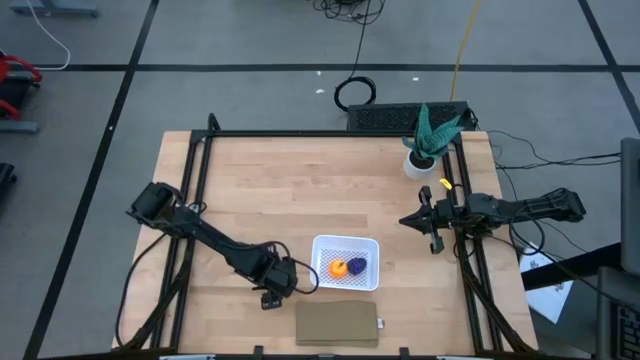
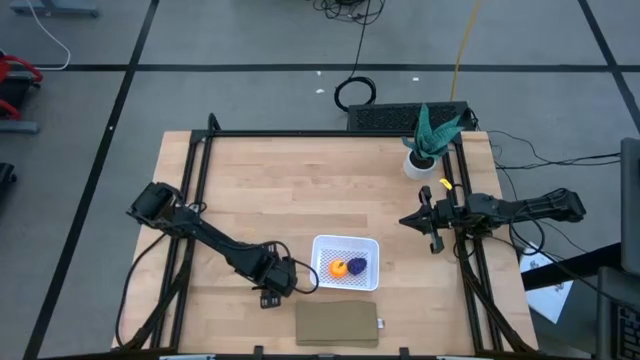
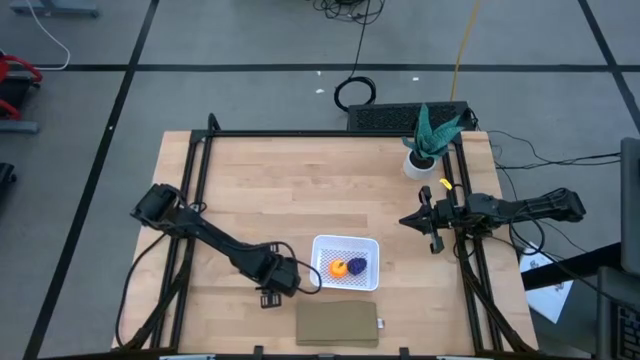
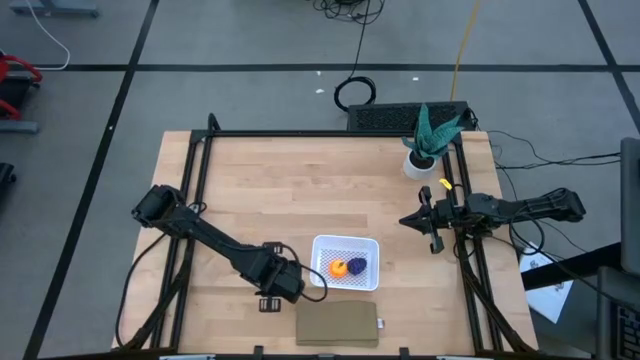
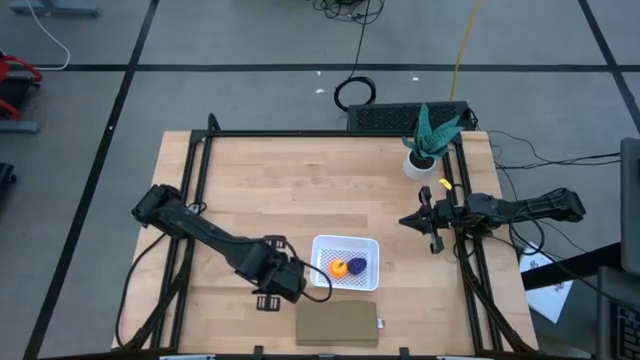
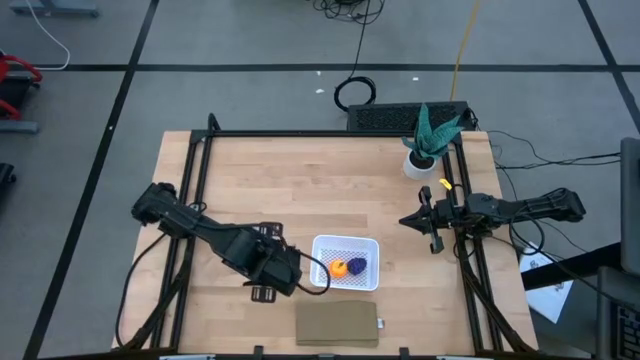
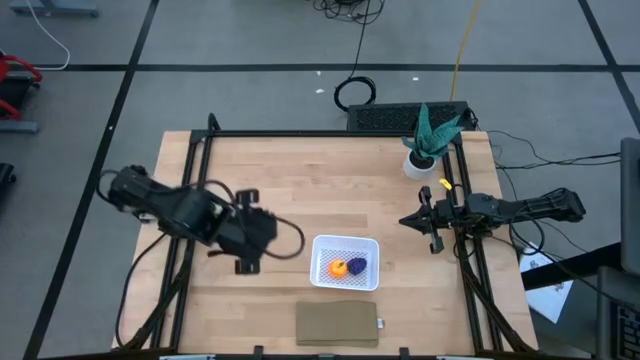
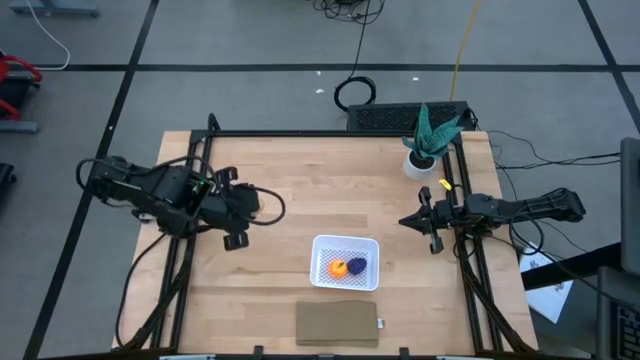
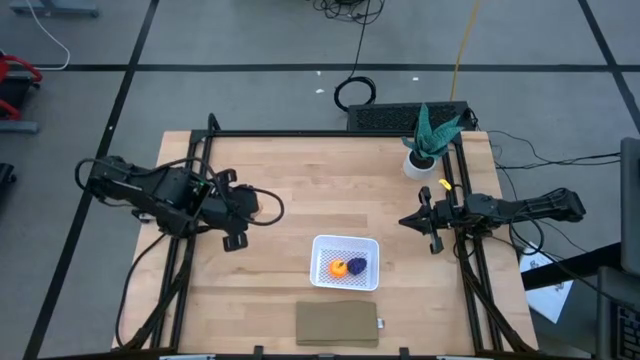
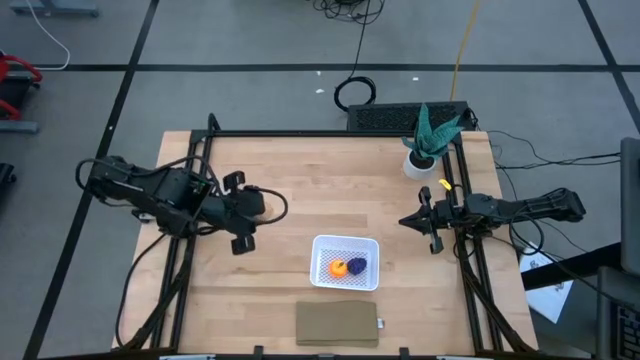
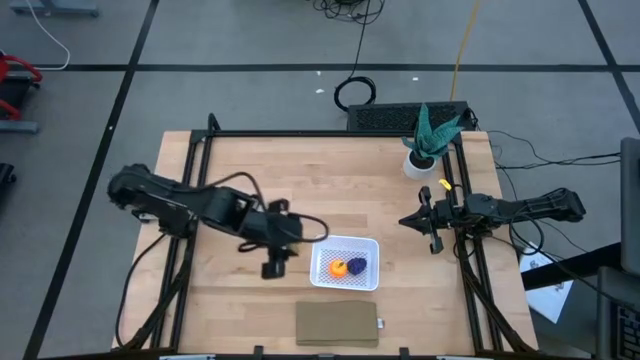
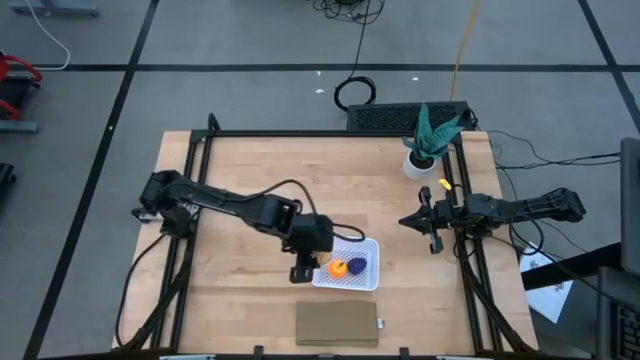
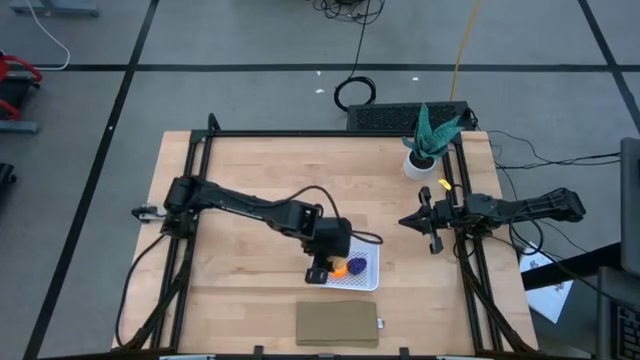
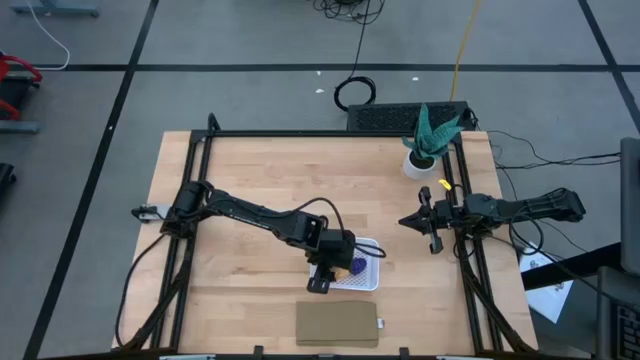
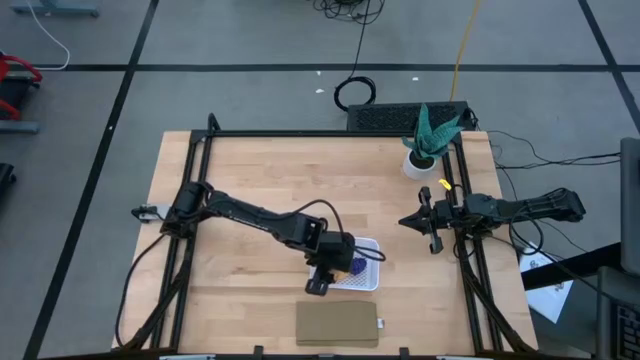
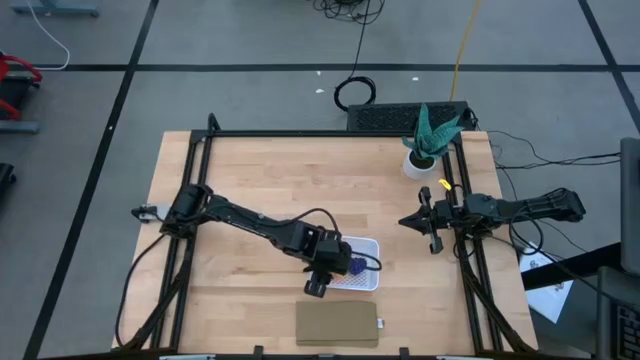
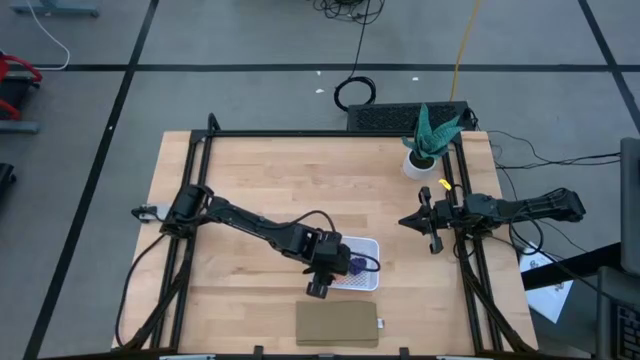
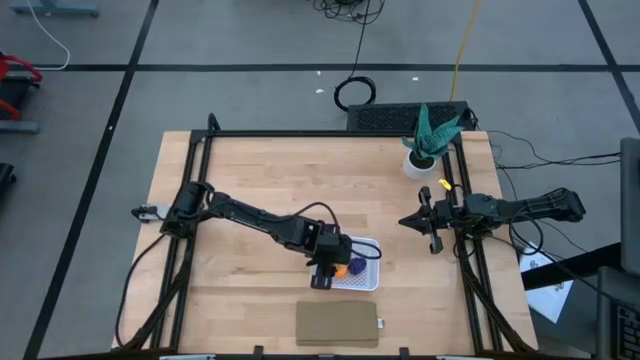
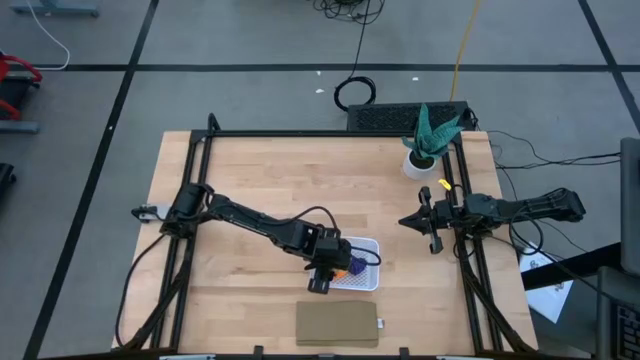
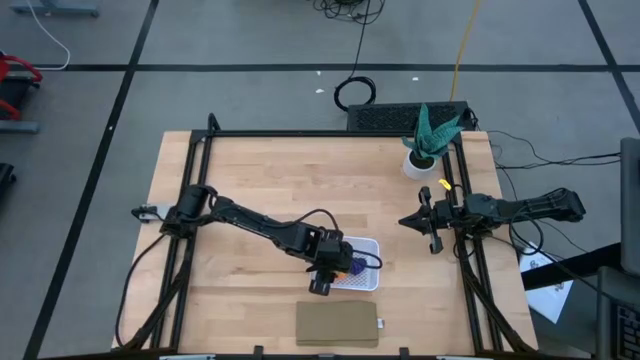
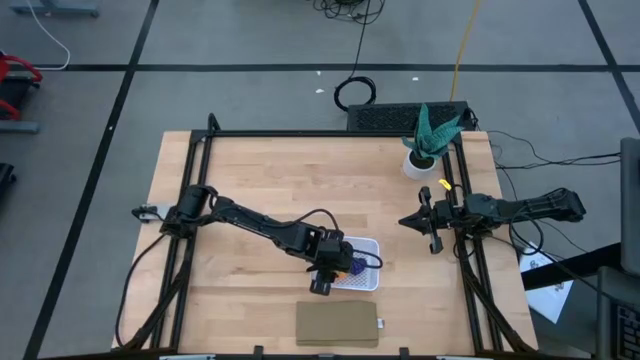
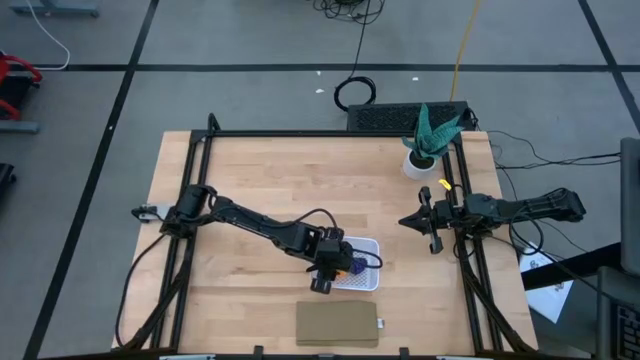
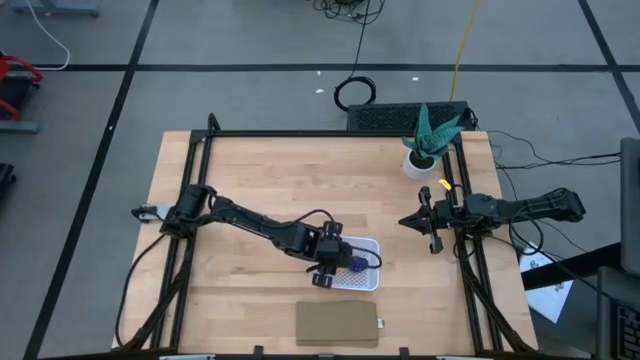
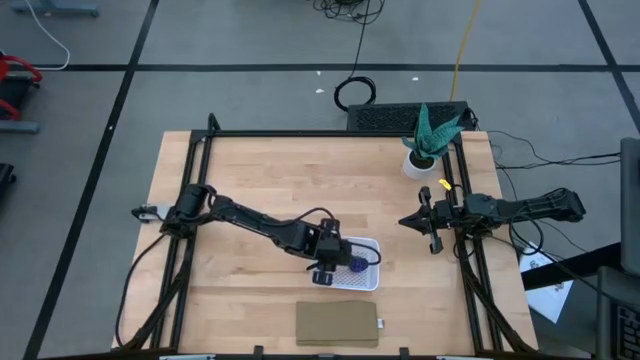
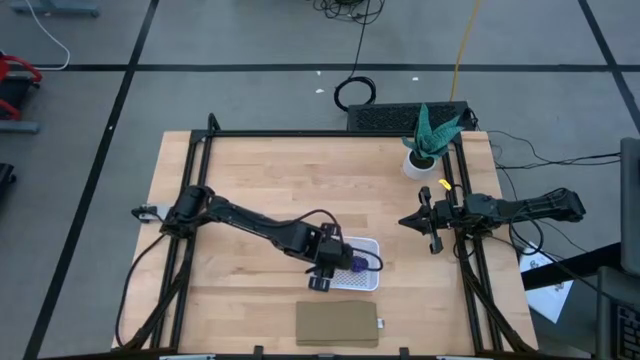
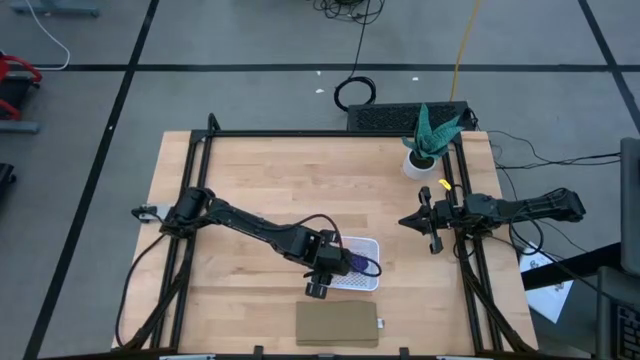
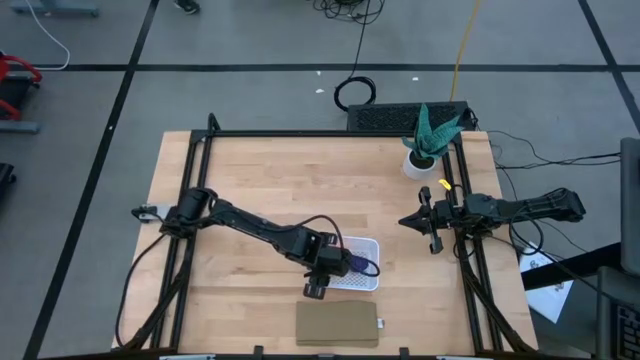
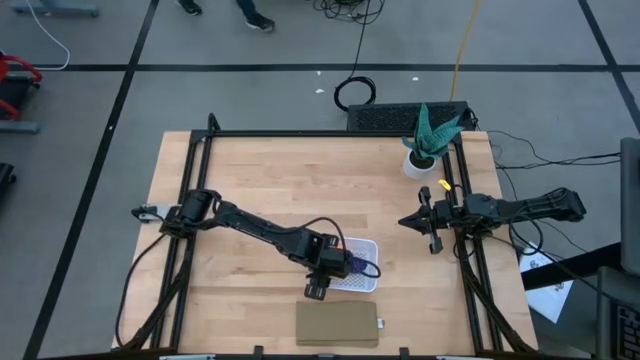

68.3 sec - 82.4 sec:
Task: Pick and placing Produce into tupperware
Put the yellow potato into the white basket

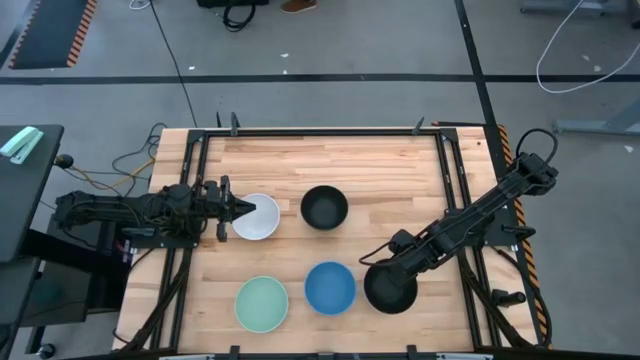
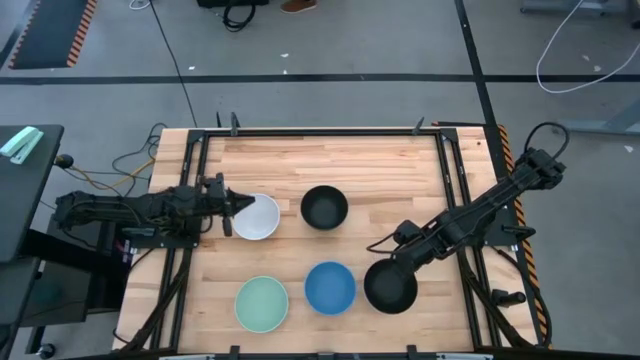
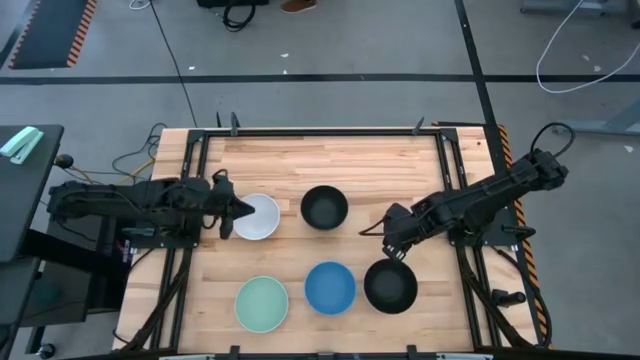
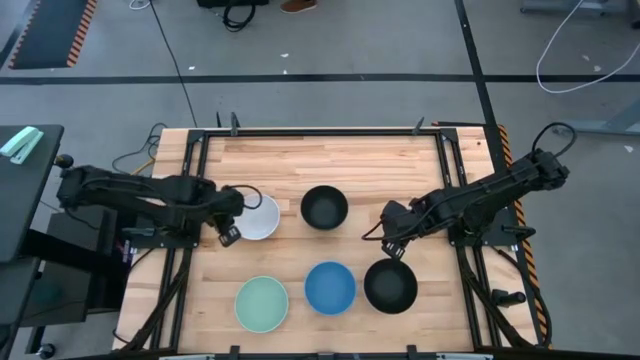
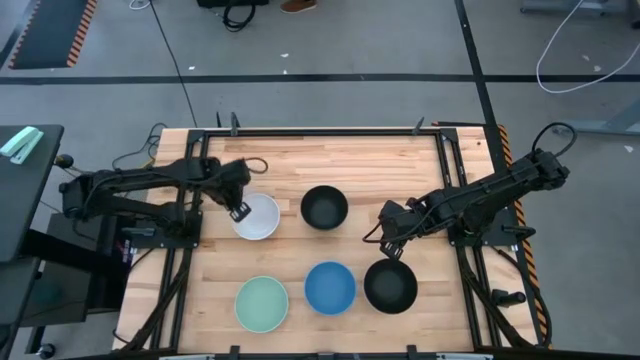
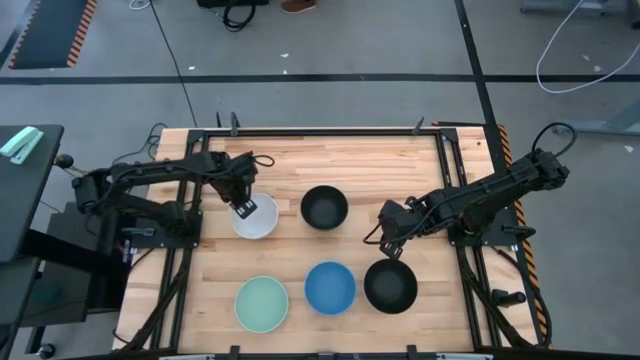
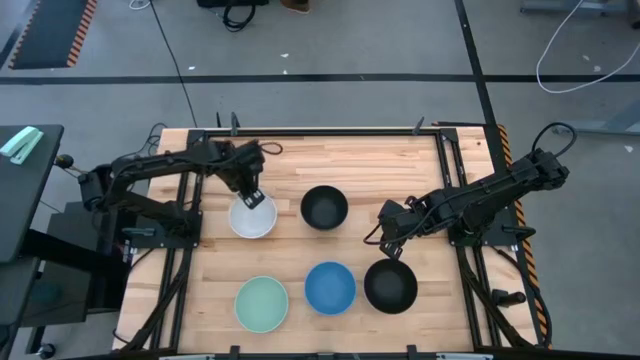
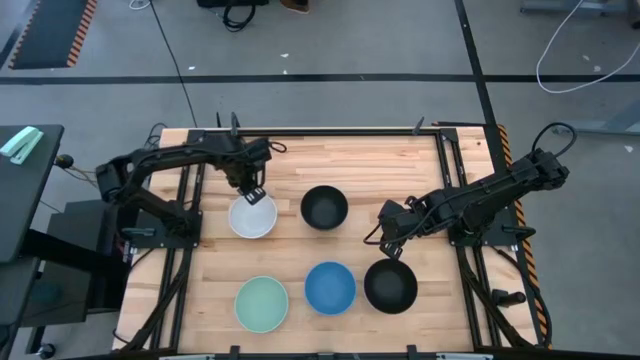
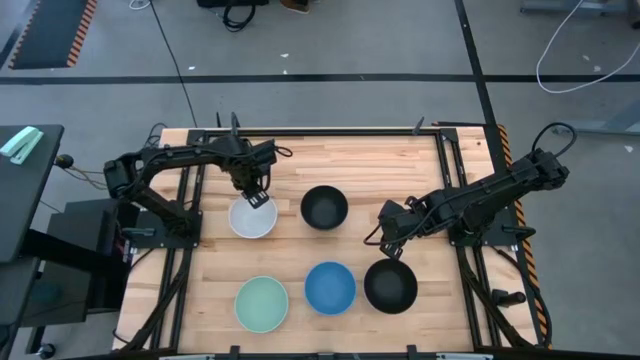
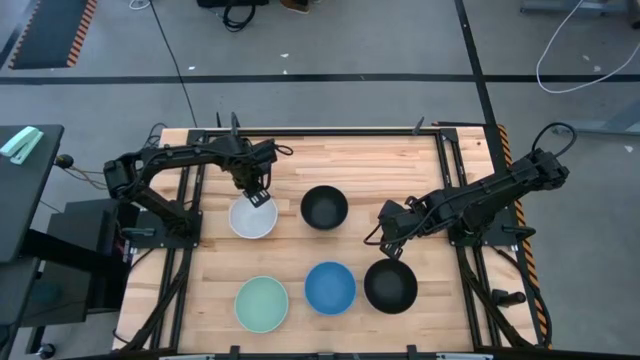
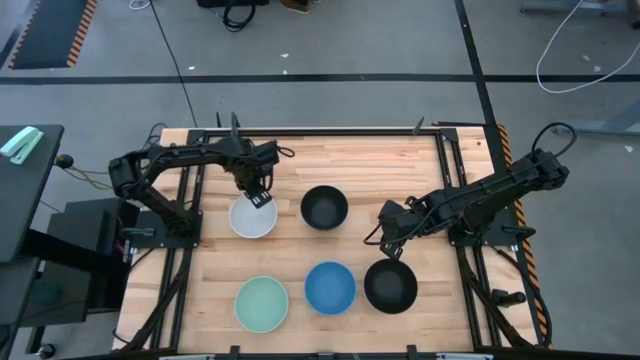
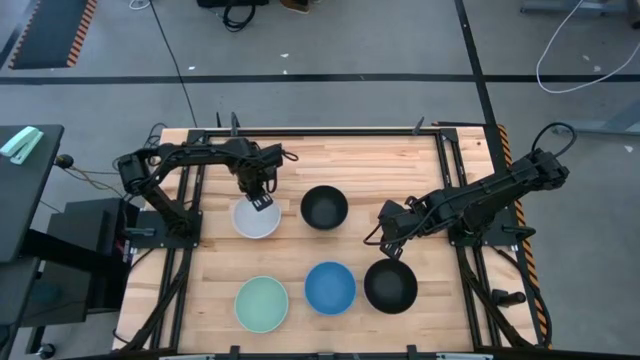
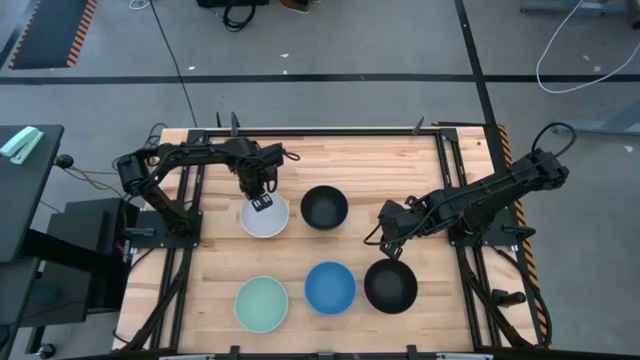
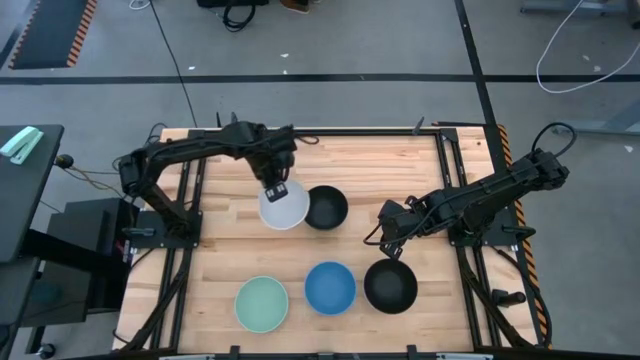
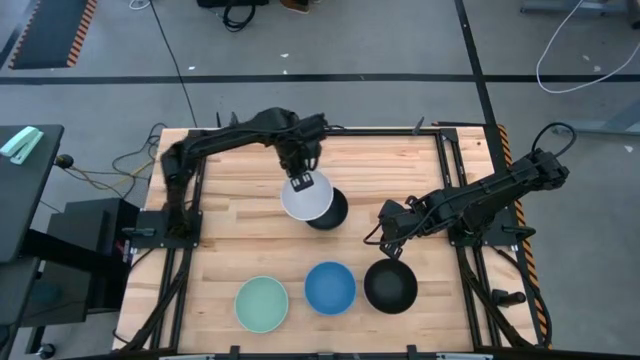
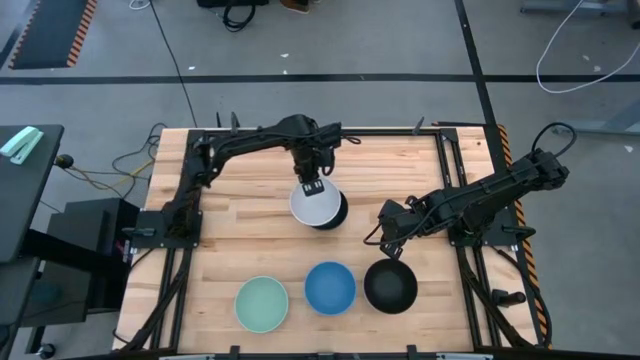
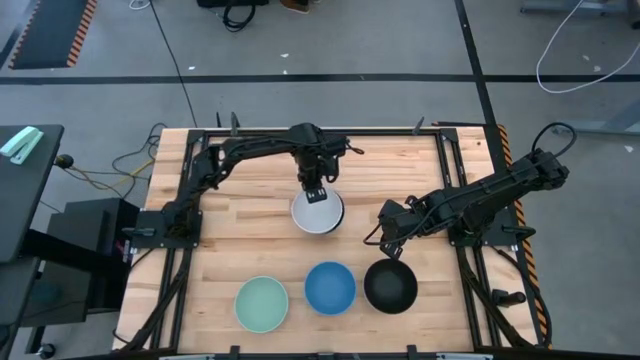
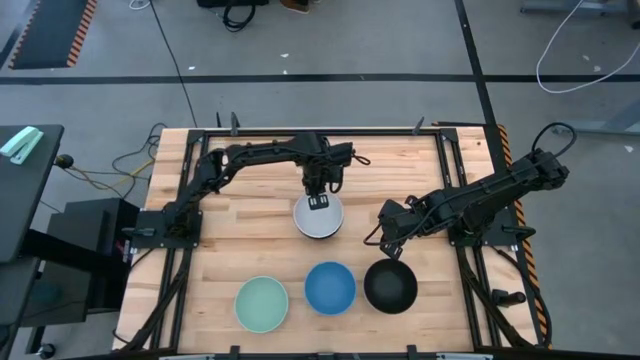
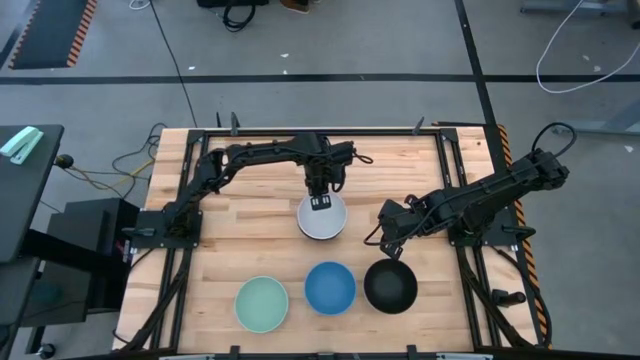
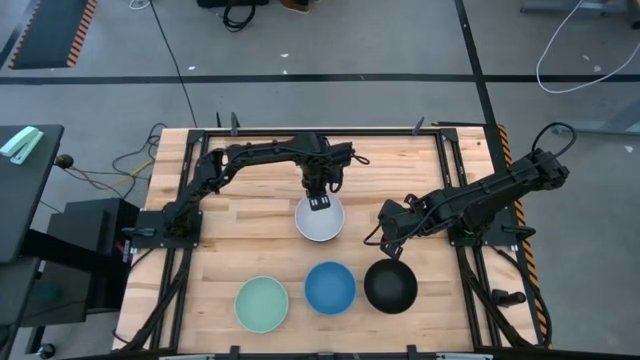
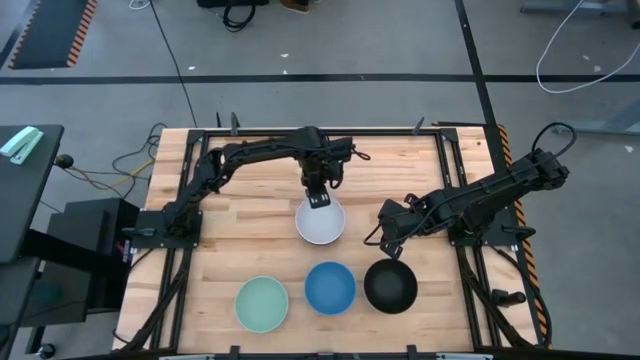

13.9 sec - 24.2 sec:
Task: Nest bowls inside each other
Stack the white bowl on the top black bowl
